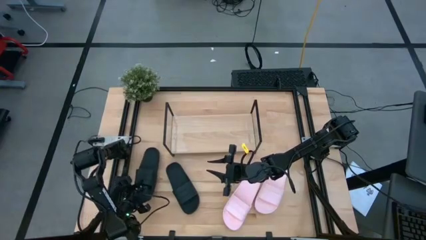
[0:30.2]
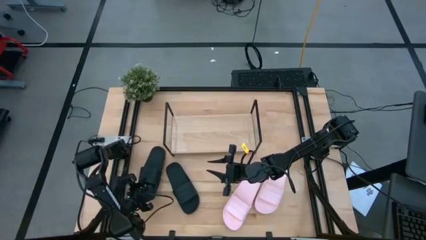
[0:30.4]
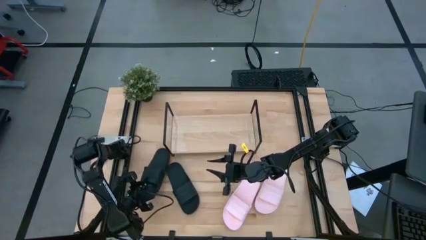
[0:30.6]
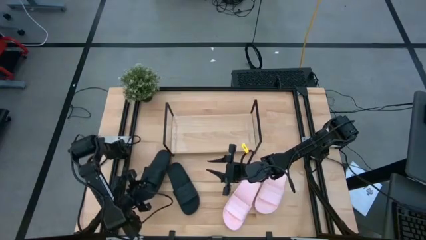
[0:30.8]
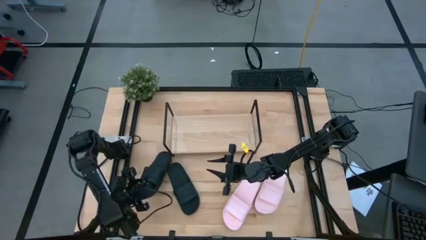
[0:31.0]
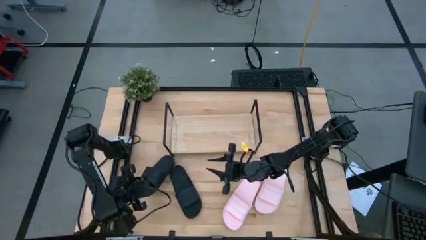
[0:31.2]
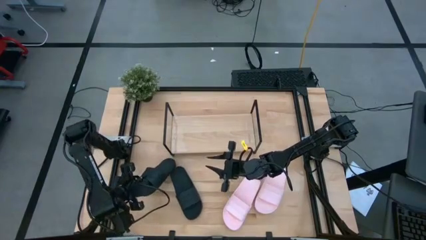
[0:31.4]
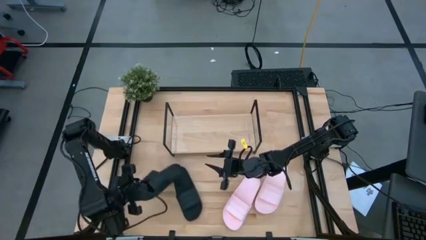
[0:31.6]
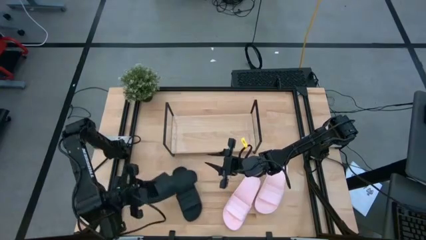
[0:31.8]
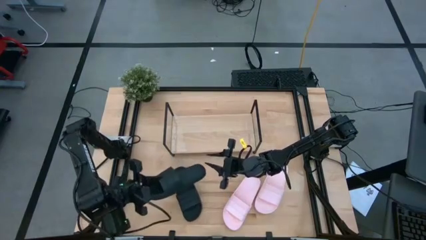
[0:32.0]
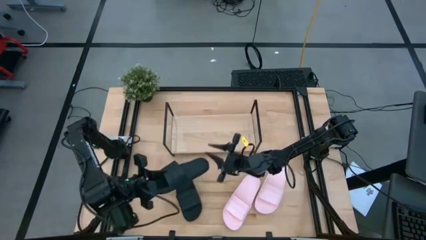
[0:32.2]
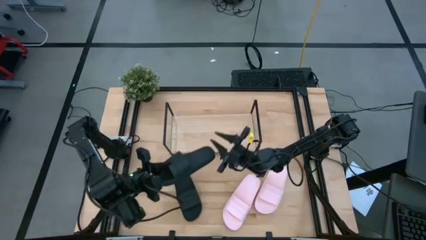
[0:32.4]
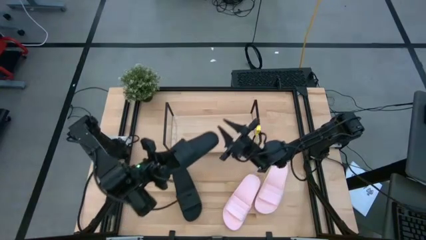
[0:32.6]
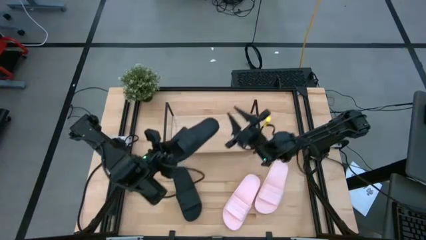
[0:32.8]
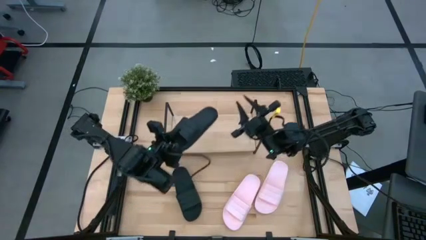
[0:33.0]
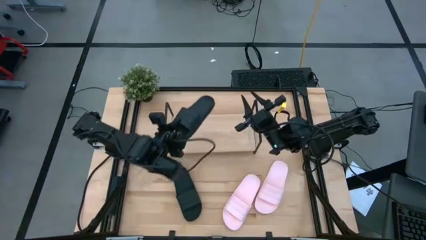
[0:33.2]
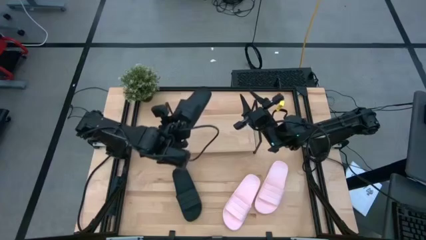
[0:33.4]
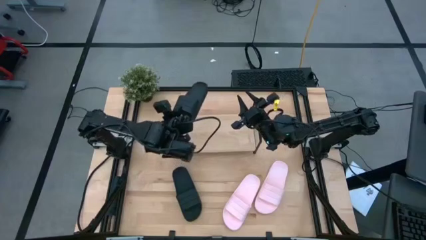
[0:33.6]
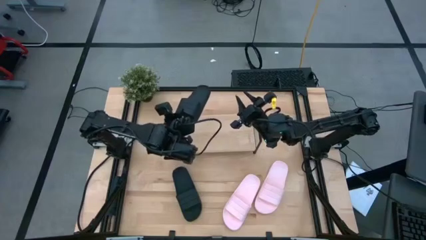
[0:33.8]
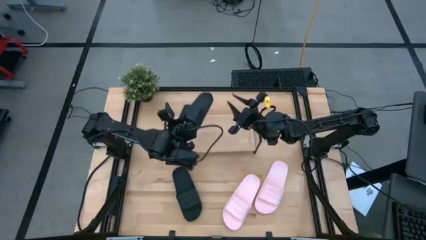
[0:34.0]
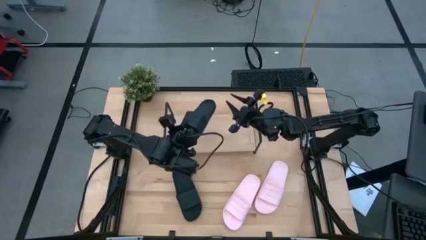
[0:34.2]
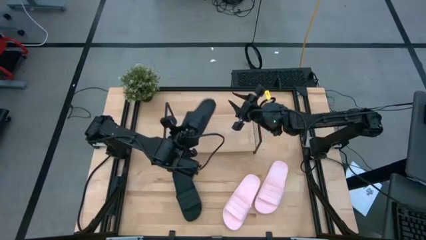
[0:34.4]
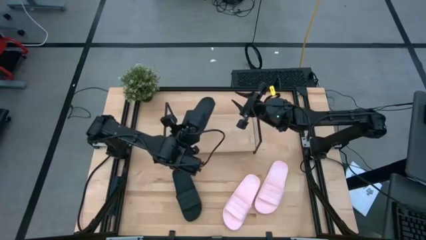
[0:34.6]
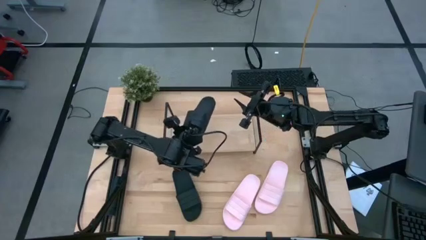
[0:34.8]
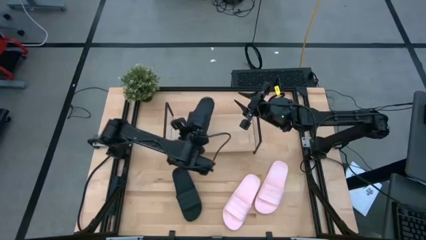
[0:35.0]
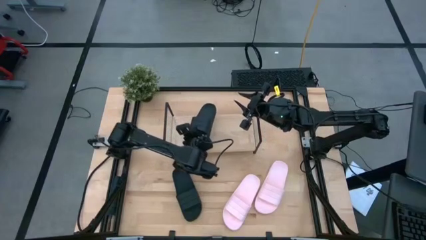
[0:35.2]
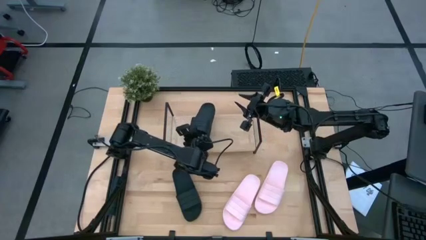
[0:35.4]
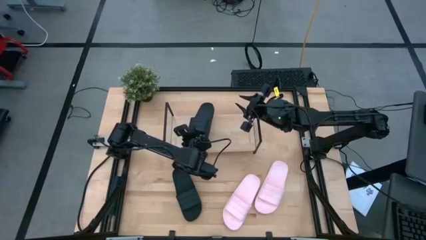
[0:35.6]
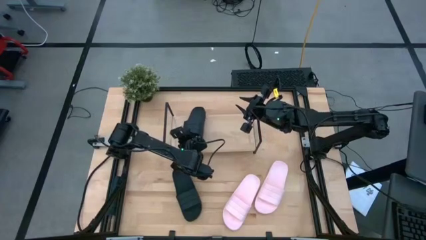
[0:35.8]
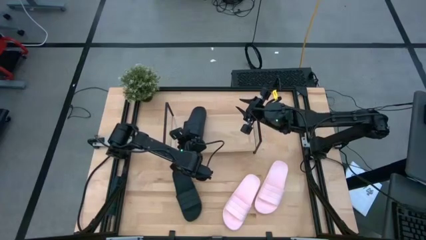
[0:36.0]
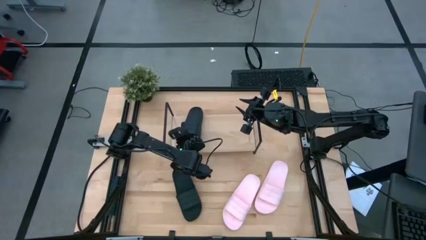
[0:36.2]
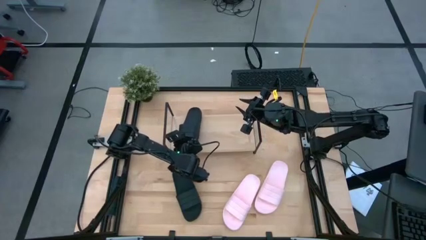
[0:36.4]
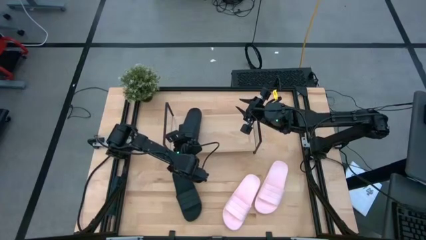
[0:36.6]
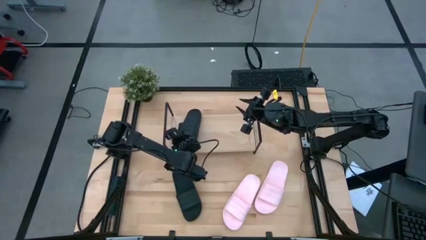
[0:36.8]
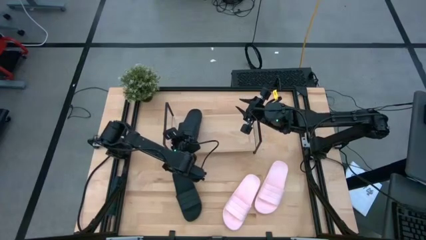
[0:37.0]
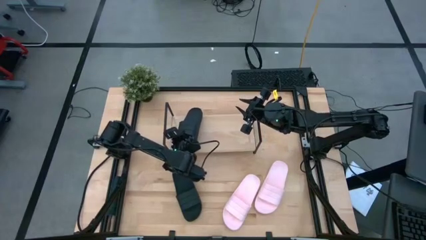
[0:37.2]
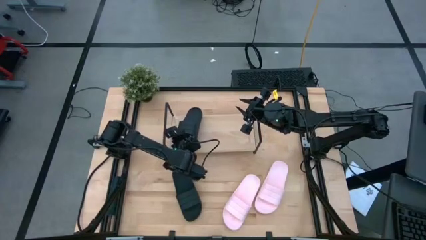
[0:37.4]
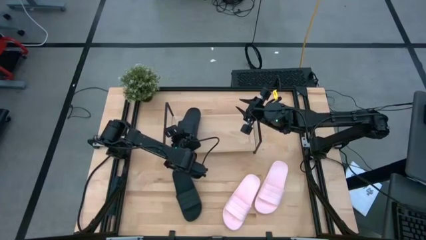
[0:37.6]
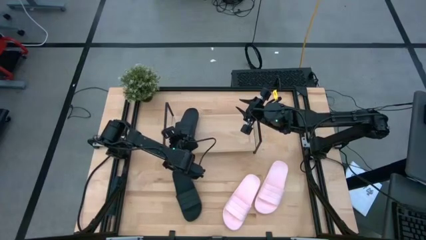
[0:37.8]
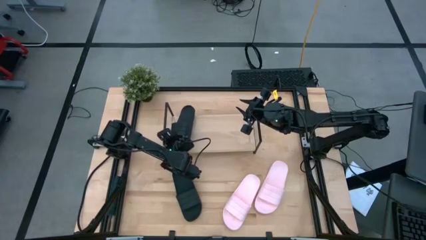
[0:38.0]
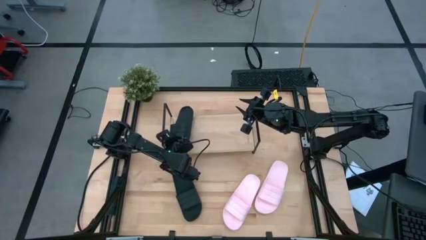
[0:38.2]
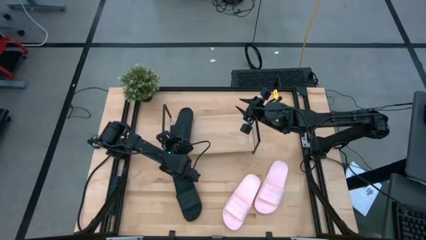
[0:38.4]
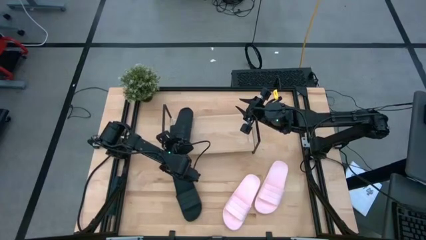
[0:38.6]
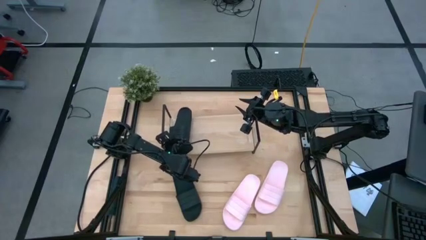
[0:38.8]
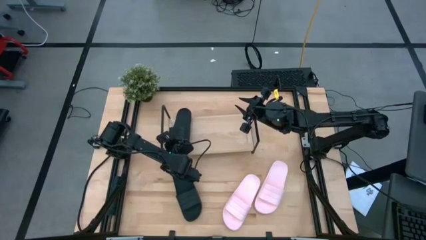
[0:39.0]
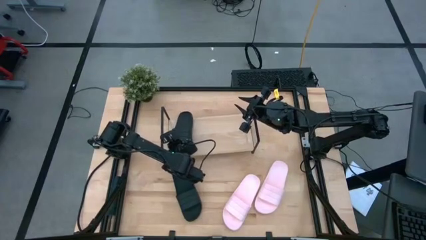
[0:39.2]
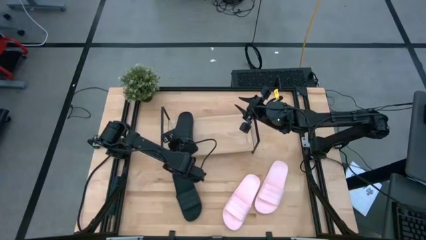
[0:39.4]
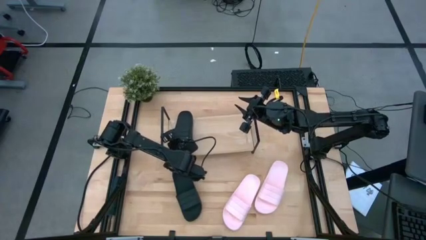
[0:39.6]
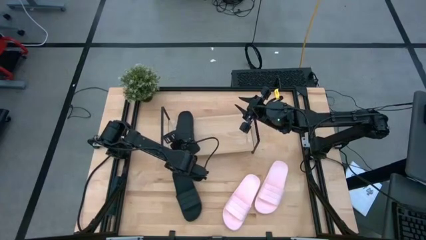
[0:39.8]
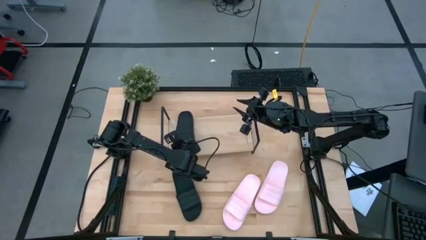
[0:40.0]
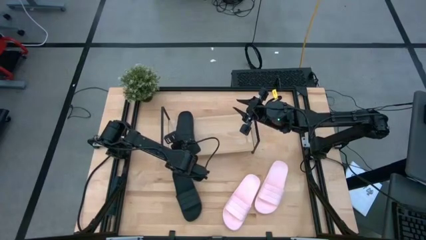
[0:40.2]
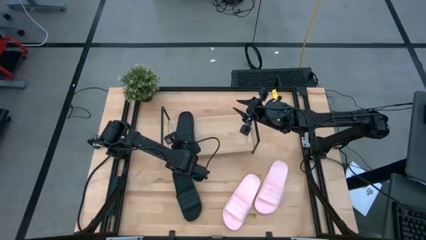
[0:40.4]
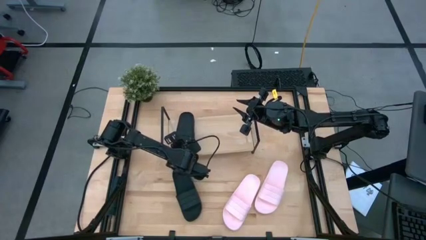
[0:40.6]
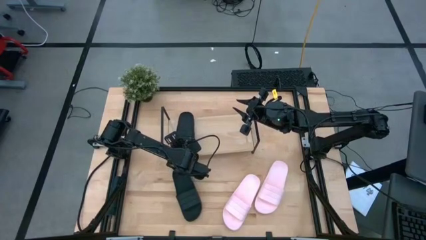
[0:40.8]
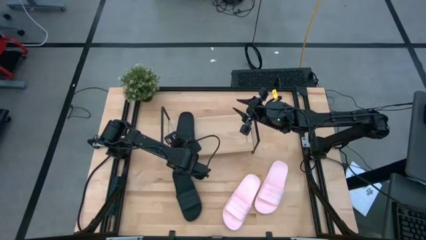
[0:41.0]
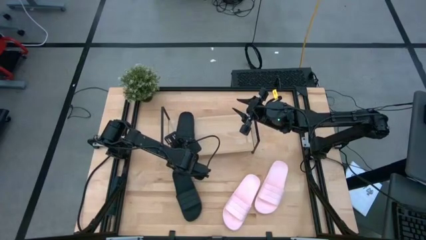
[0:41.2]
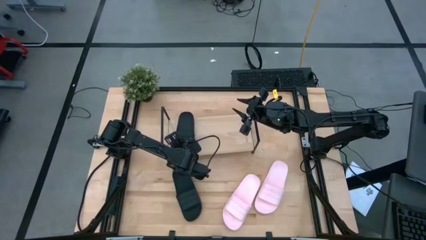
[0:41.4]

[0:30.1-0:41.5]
Task: Pick and place slides into the shelf
Put the left black pair of slide on the shelf
